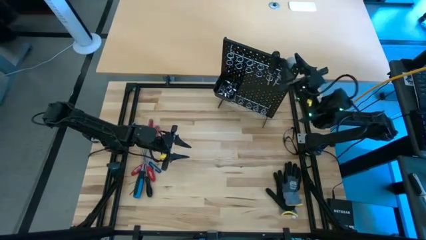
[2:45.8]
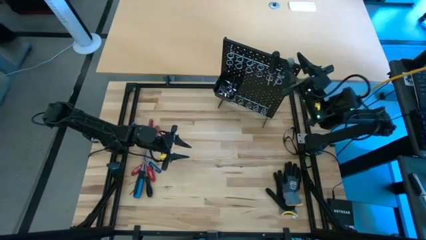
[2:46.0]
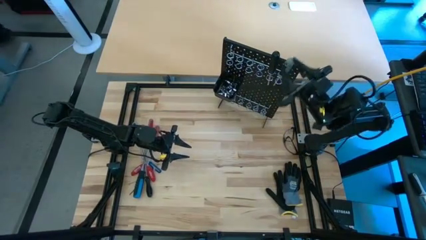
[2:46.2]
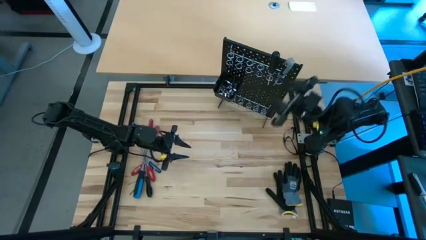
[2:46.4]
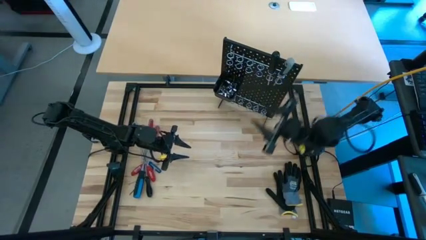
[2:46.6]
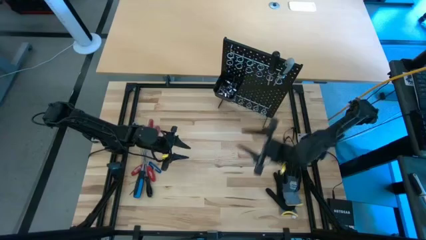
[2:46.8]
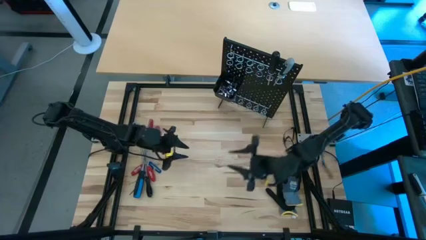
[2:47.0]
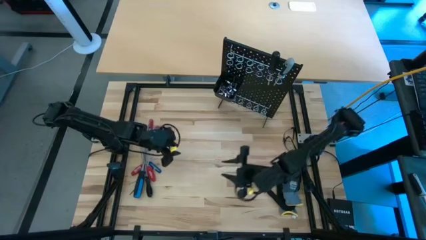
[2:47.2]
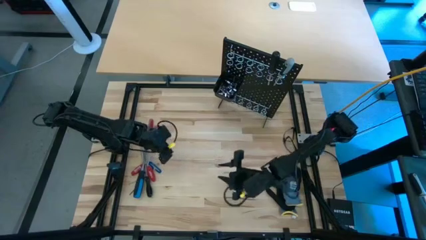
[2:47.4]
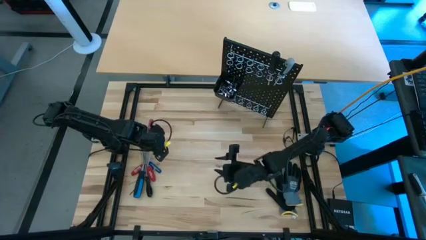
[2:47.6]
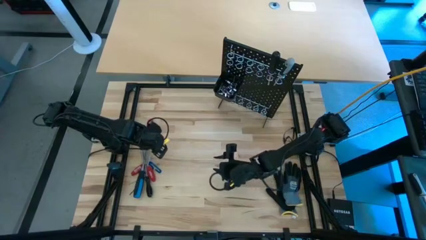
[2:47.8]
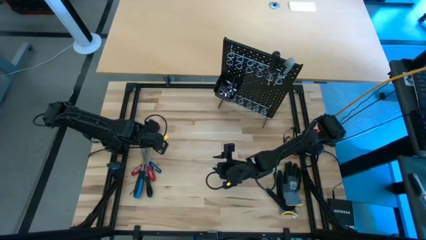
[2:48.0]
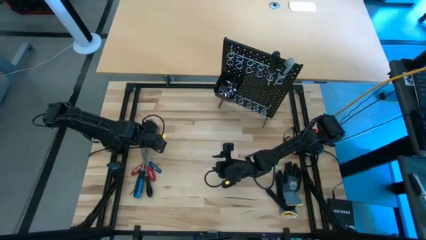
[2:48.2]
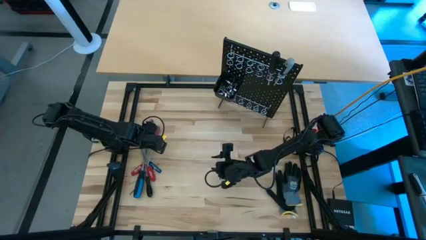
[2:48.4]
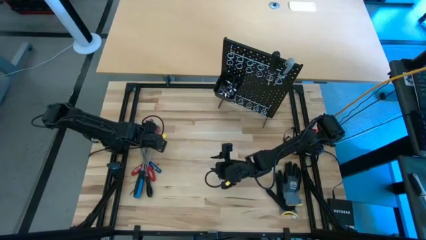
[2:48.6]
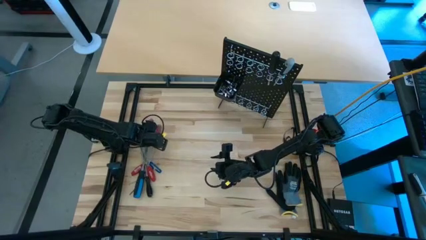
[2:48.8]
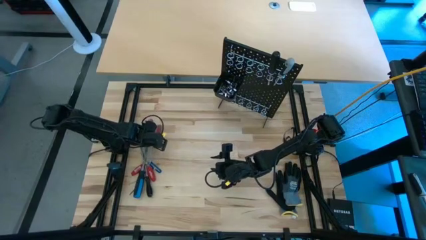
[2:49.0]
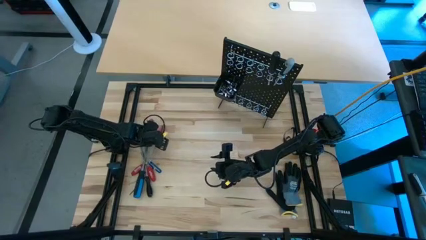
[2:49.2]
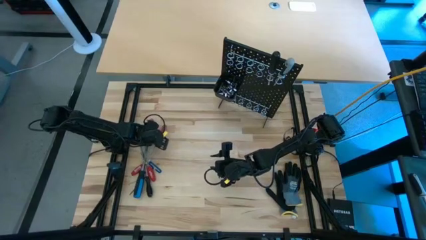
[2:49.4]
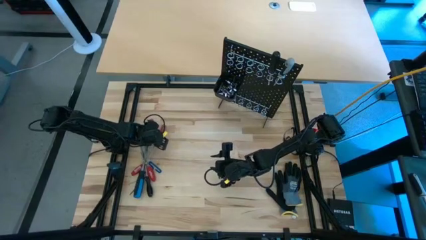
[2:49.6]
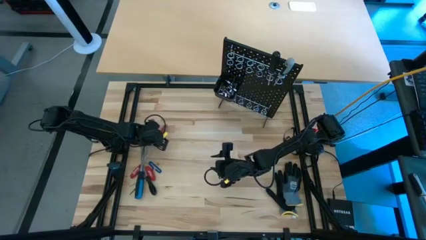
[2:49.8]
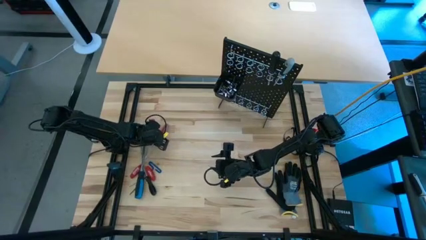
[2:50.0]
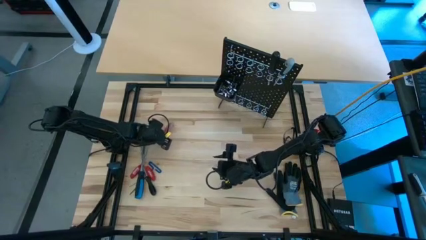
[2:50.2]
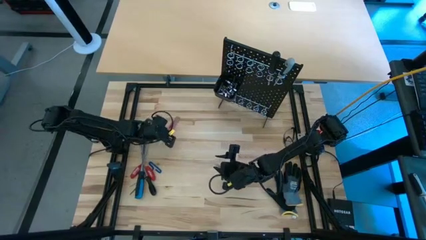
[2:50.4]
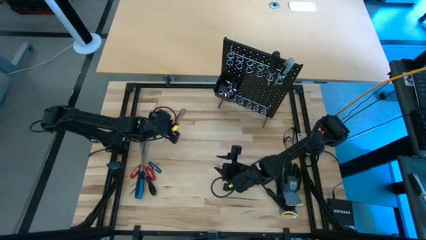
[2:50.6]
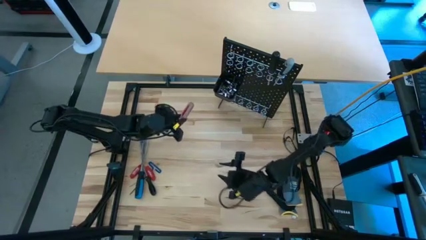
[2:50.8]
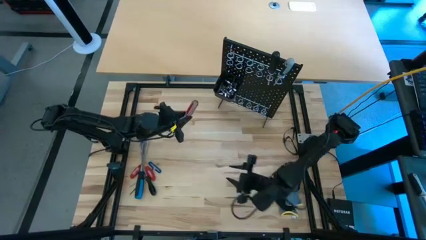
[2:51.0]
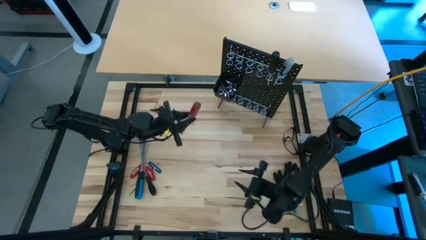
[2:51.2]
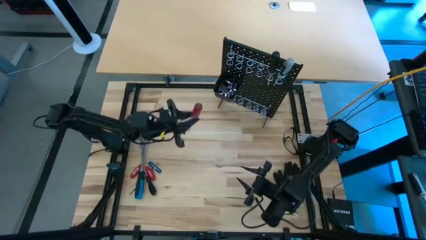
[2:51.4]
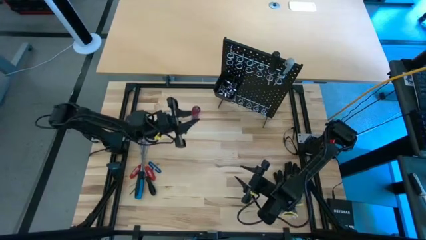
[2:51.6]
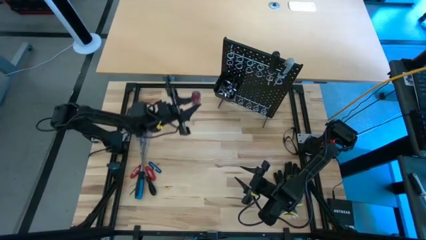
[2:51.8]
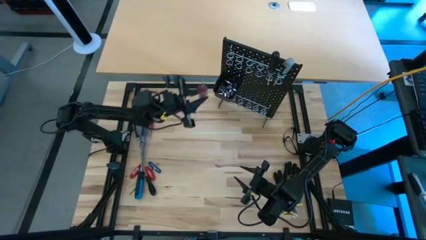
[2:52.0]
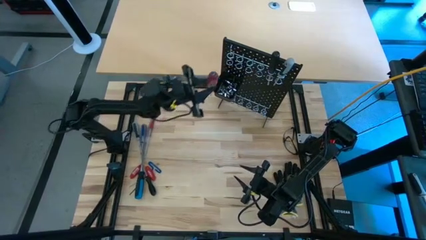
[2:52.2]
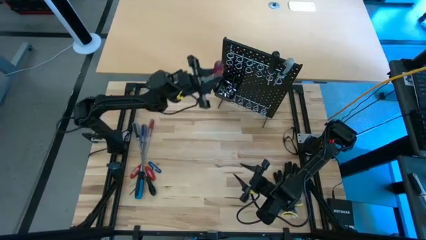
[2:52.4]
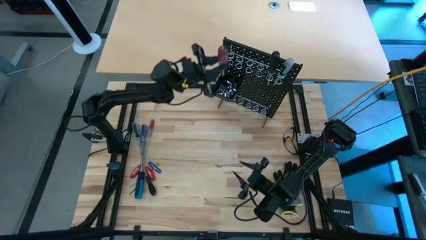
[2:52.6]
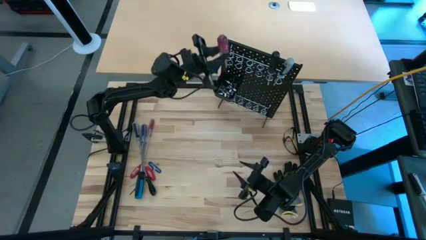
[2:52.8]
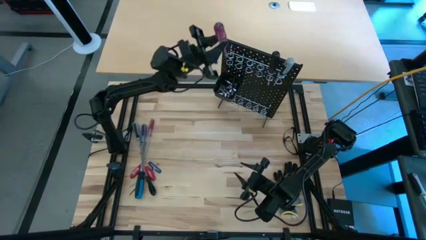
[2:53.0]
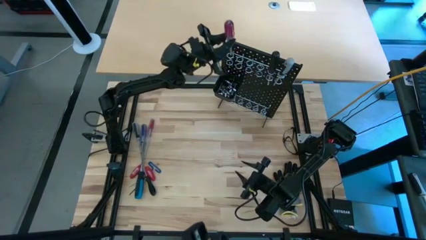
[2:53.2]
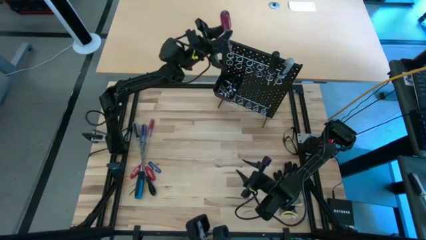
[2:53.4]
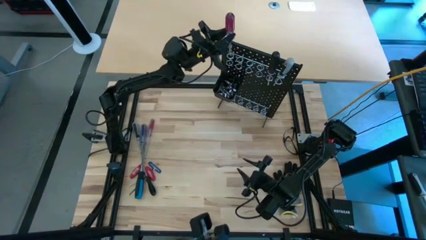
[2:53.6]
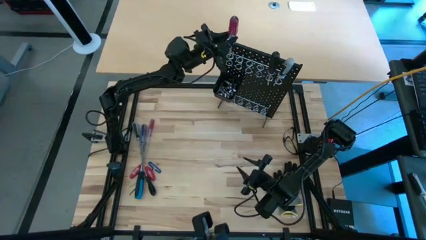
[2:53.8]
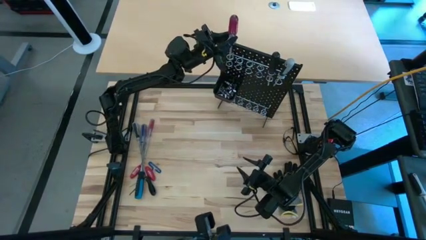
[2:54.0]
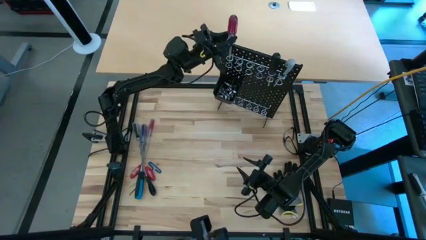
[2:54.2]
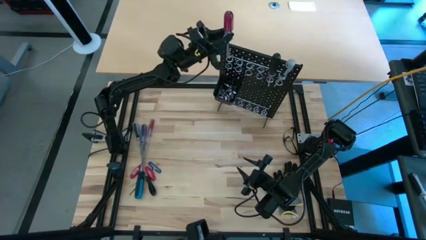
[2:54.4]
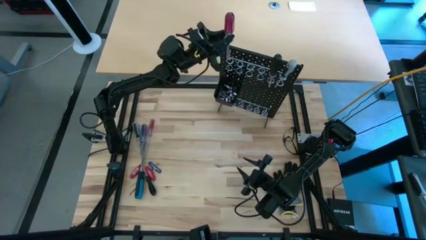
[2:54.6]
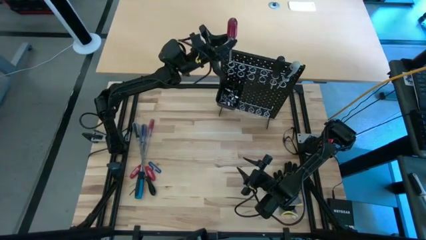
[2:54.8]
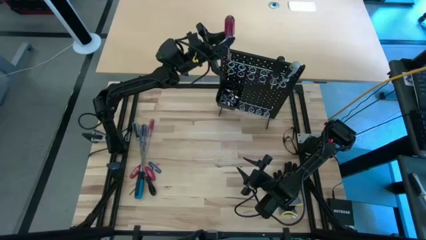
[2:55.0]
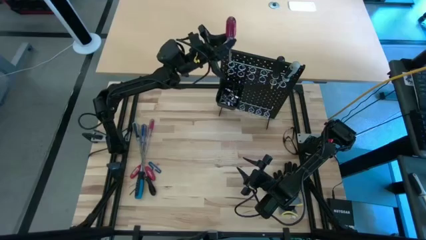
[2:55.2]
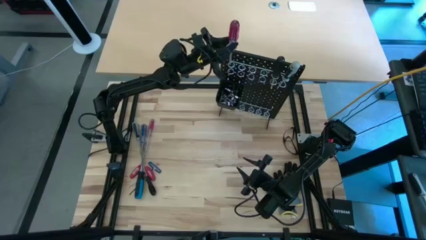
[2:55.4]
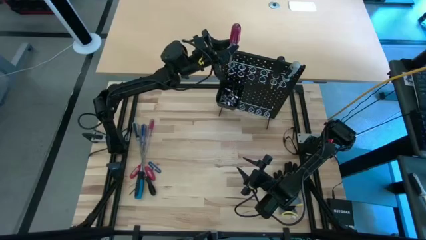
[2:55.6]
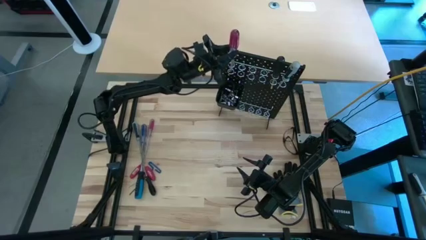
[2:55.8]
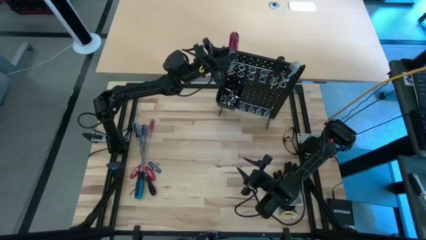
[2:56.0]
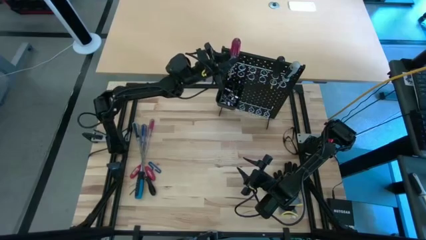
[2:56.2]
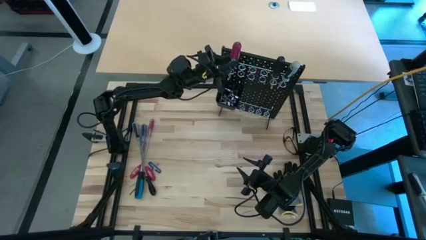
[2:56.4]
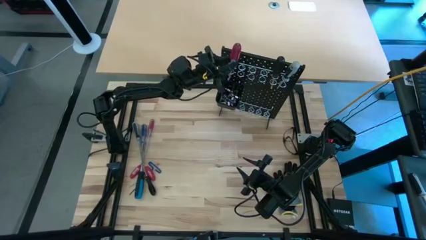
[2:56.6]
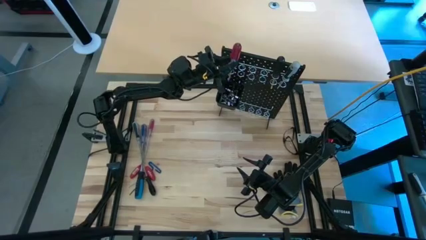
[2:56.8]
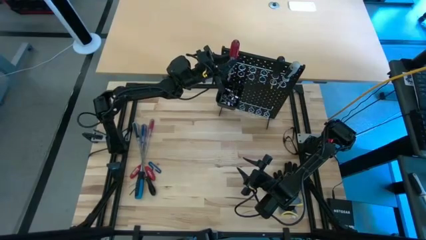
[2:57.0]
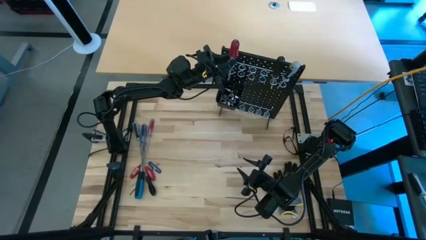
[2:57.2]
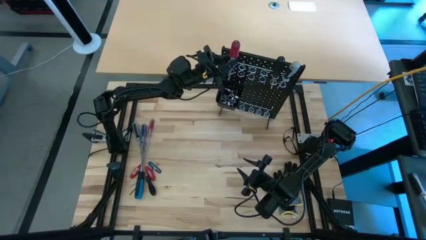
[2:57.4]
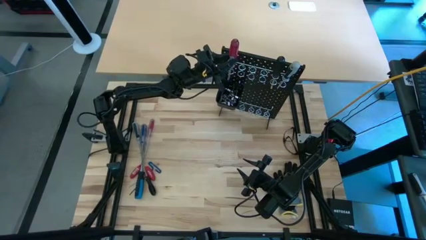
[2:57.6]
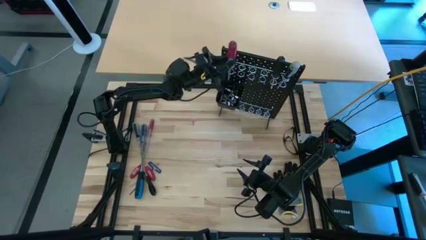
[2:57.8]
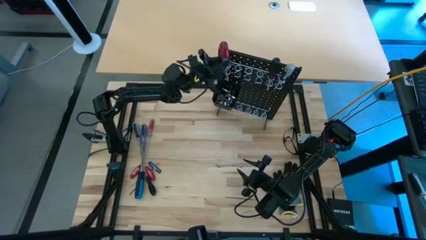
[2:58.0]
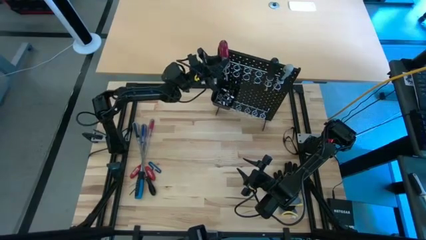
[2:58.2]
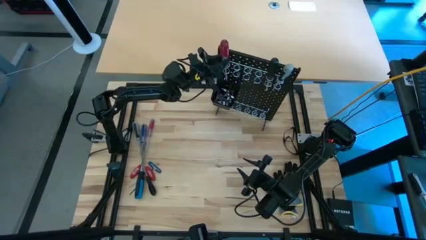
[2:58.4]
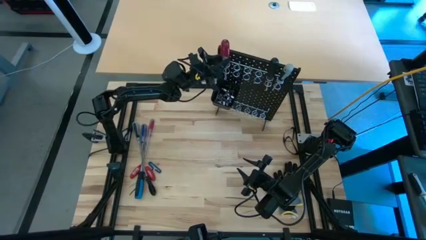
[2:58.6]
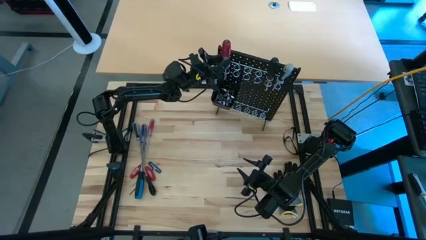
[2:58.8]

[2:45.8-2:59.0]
Task: Hang tools onto peg board
Hang the right red screwdriver on the black pegboard

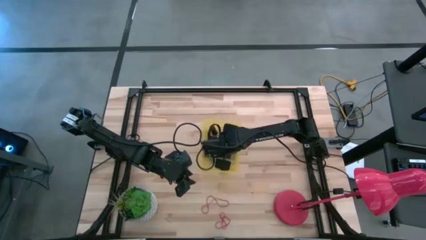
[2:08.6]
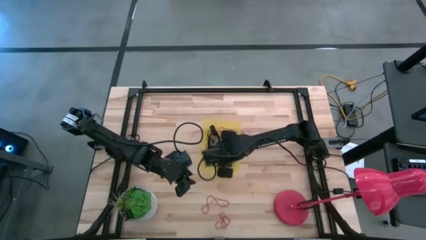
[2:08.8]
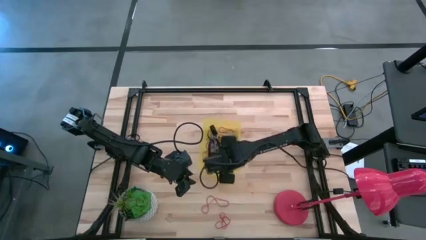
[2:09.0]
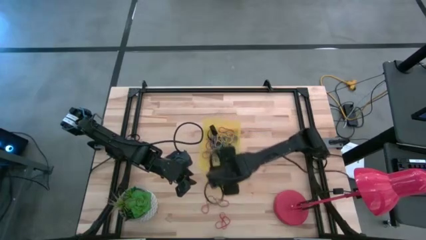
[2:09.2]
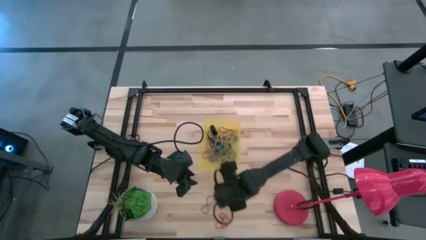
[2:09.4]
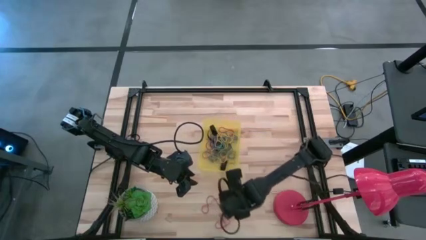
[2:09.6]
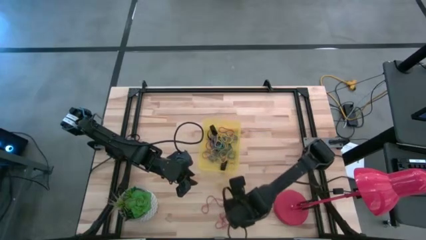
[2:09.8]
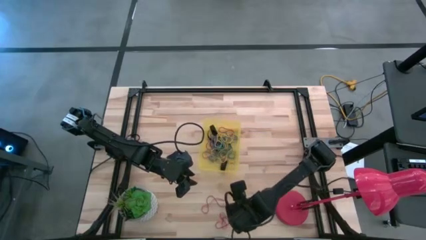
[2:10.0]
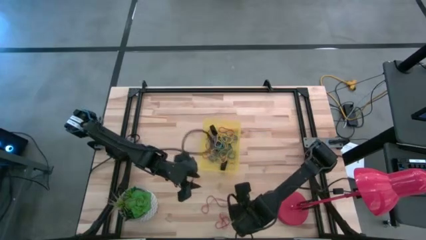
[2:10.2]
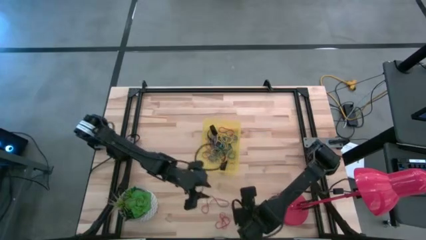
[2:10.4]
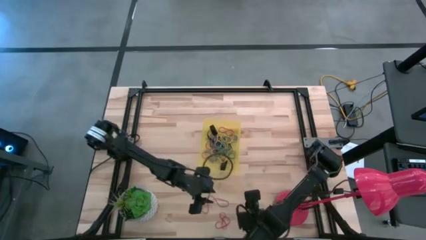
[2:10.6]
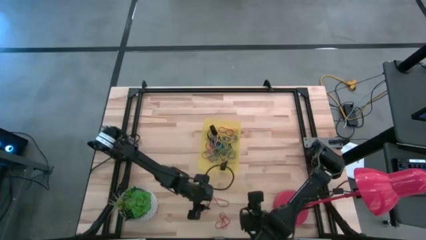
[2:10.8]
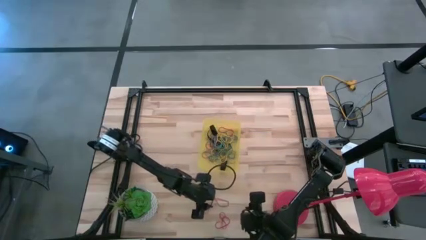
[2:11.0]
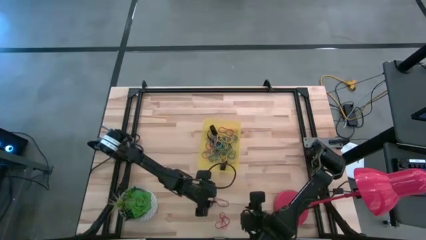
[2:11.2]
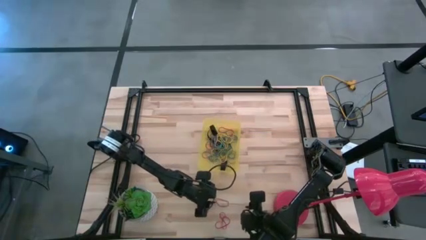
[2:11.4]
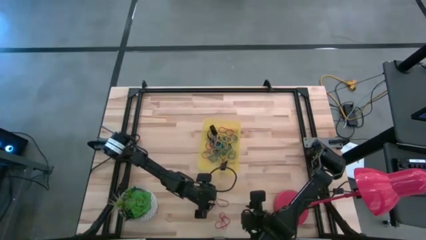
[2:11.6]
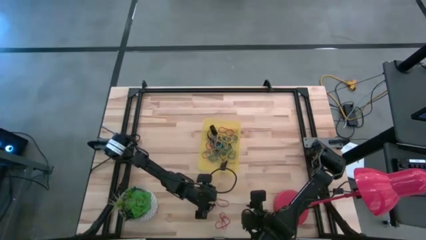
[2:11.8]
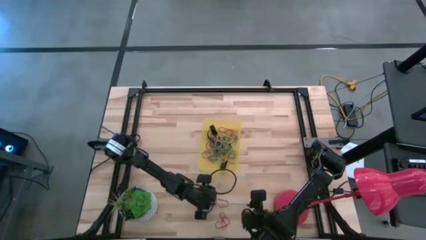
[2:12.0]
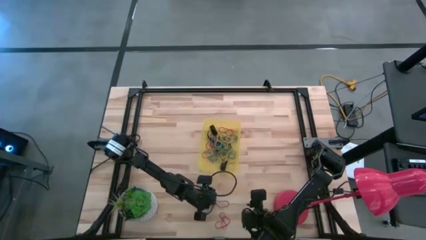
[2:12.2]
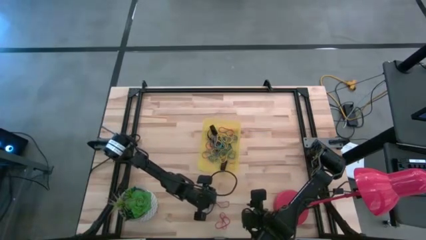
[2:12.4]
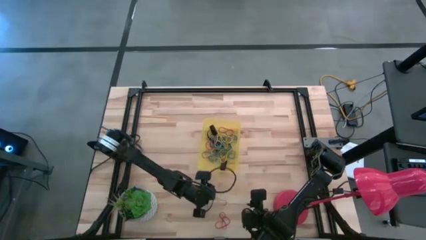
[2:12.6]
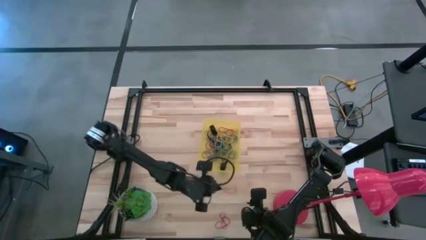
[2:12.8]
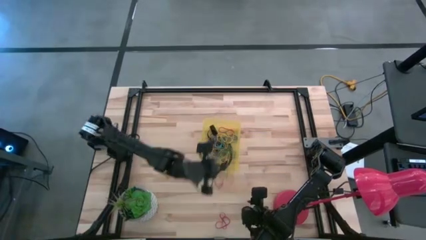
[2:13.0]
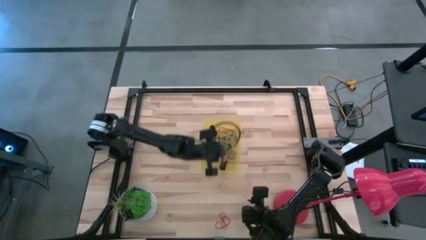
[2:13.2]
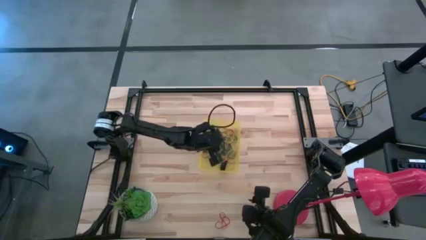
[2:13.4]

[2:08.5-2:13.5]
Task: Pick and place rubber bands into bin
Put the red rubber band into the yellow bin
